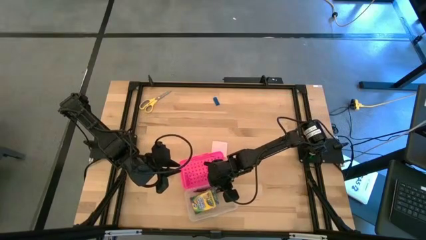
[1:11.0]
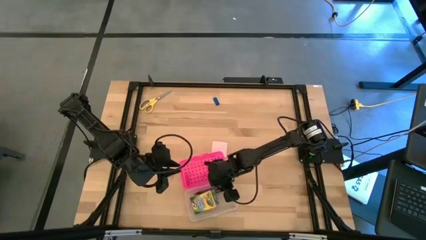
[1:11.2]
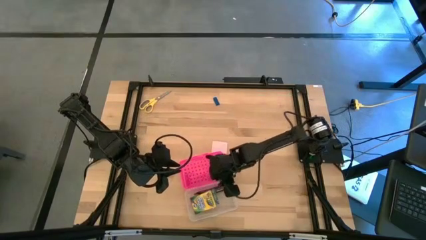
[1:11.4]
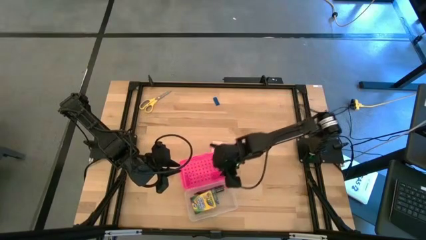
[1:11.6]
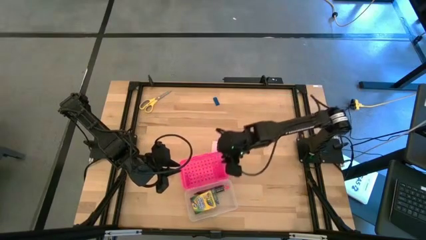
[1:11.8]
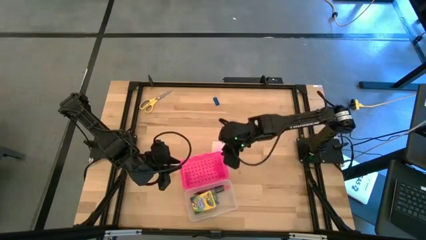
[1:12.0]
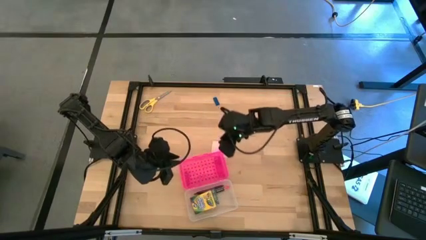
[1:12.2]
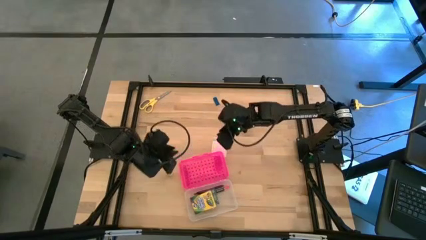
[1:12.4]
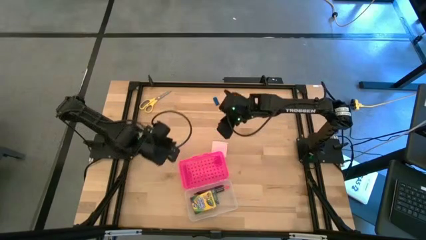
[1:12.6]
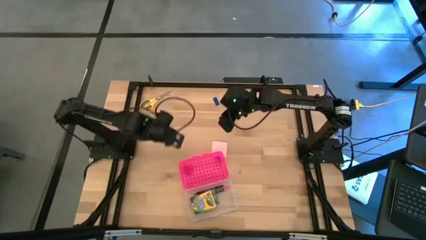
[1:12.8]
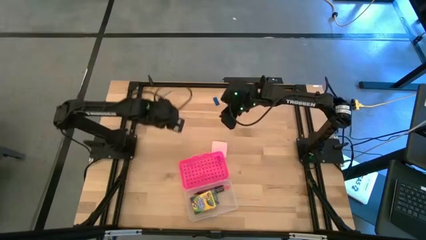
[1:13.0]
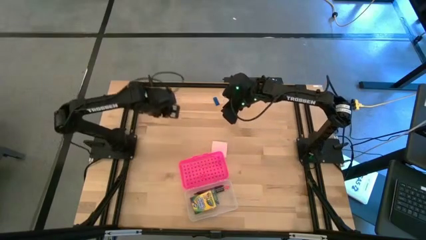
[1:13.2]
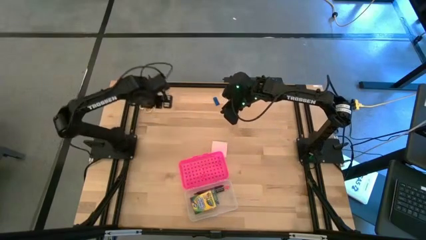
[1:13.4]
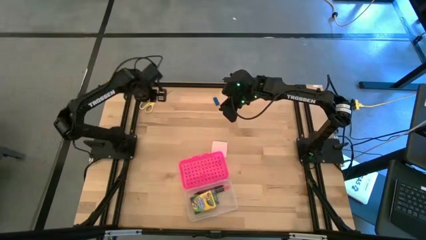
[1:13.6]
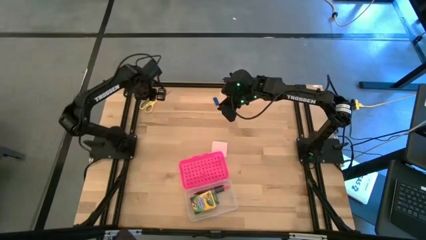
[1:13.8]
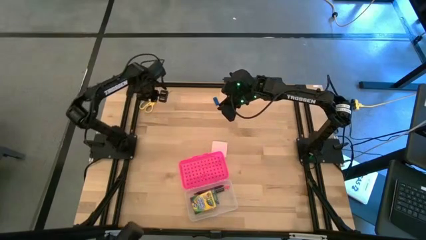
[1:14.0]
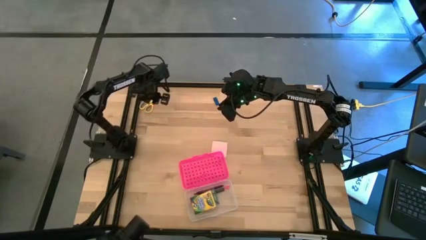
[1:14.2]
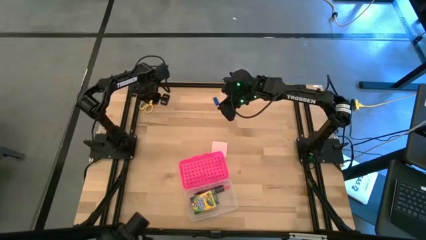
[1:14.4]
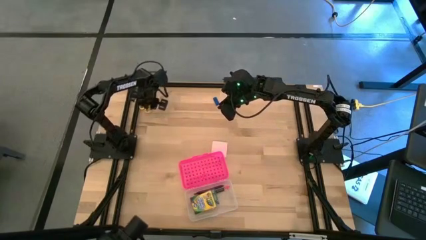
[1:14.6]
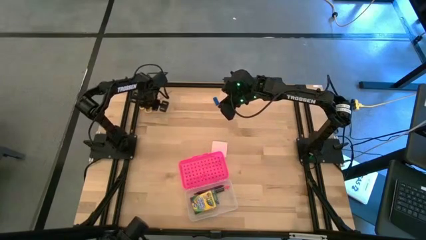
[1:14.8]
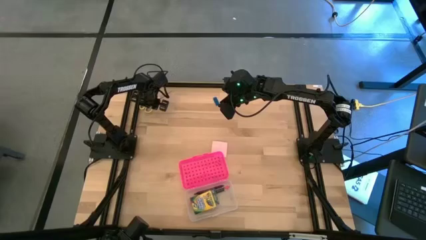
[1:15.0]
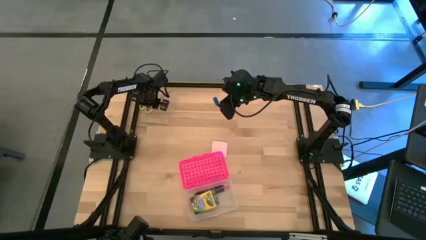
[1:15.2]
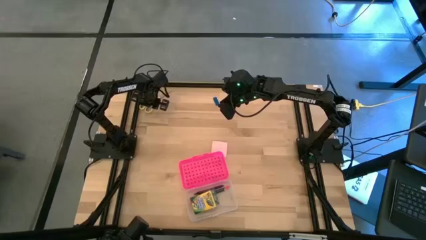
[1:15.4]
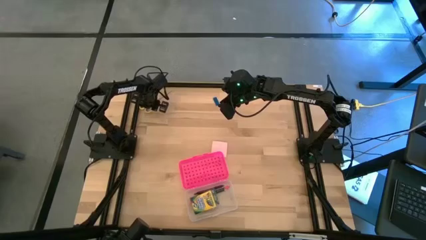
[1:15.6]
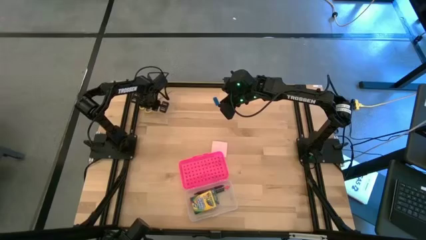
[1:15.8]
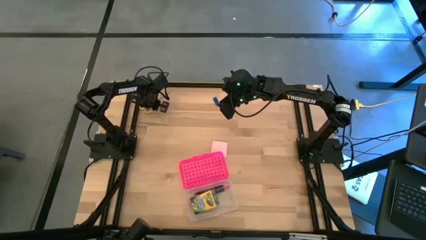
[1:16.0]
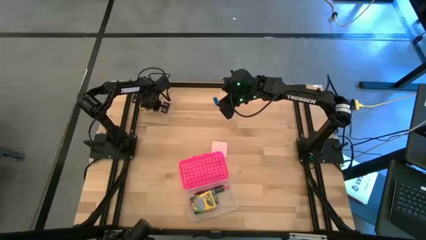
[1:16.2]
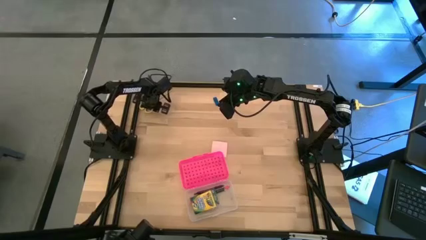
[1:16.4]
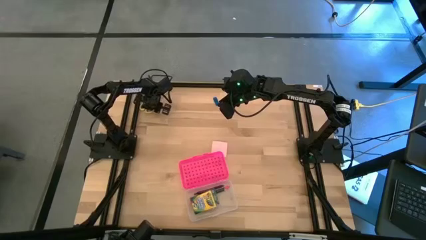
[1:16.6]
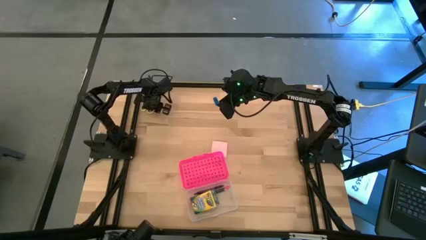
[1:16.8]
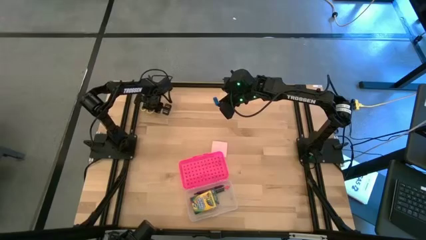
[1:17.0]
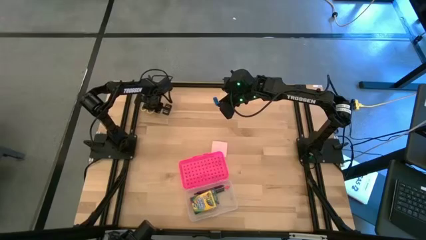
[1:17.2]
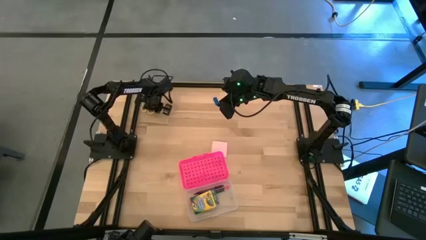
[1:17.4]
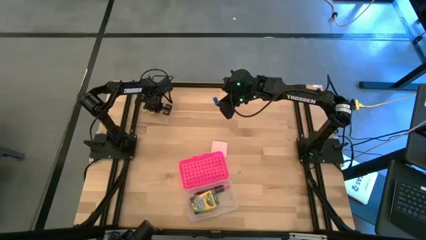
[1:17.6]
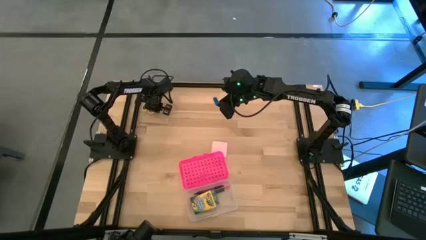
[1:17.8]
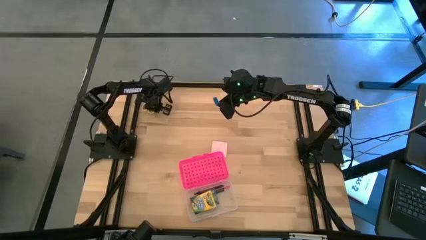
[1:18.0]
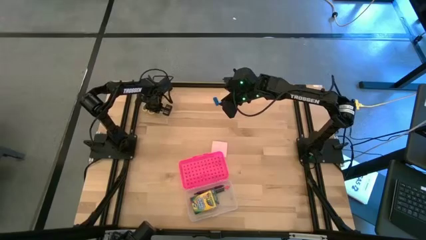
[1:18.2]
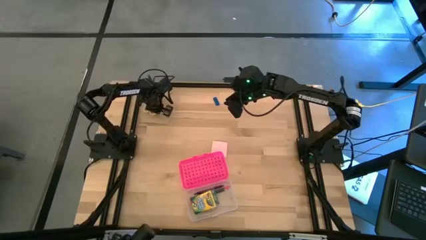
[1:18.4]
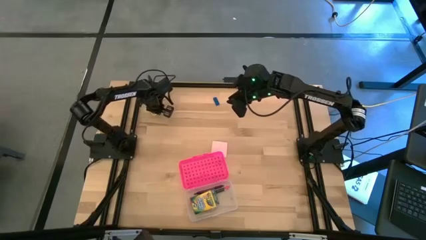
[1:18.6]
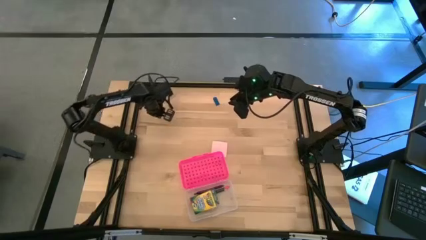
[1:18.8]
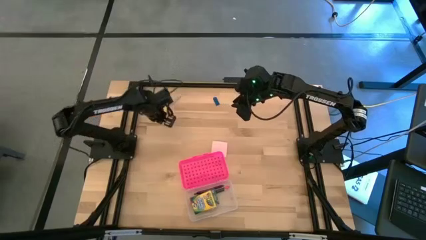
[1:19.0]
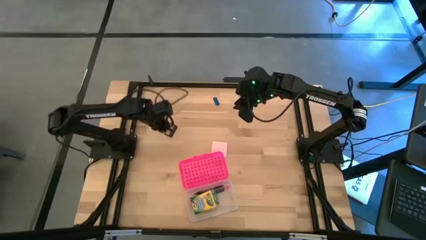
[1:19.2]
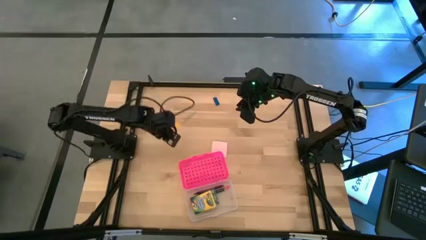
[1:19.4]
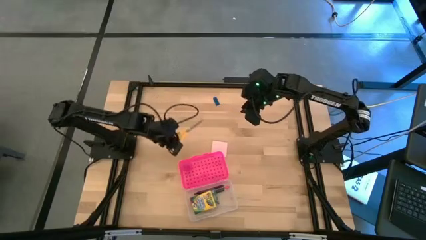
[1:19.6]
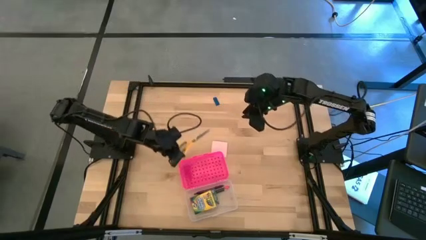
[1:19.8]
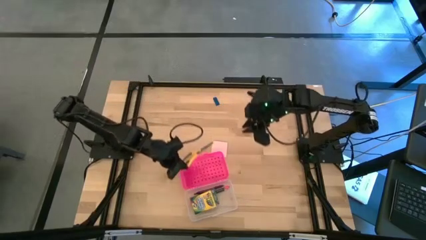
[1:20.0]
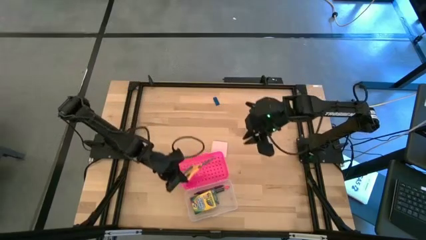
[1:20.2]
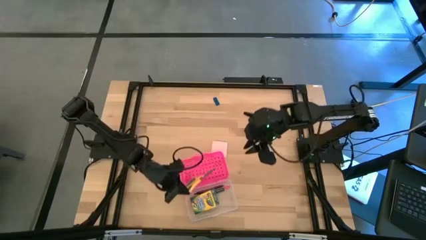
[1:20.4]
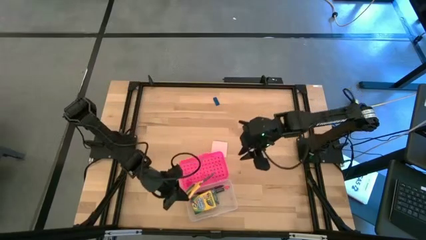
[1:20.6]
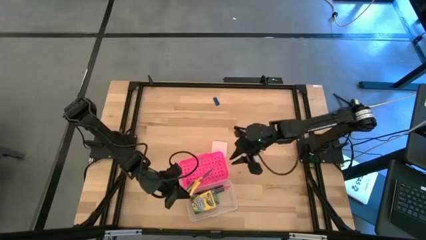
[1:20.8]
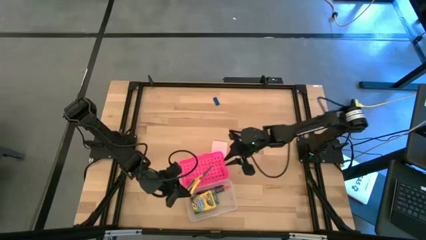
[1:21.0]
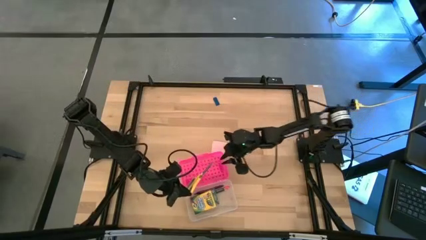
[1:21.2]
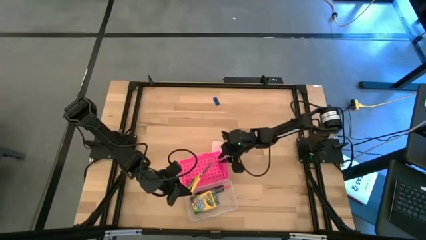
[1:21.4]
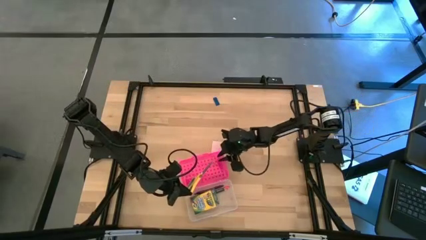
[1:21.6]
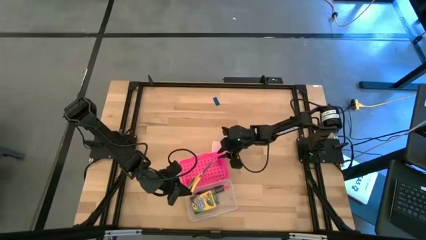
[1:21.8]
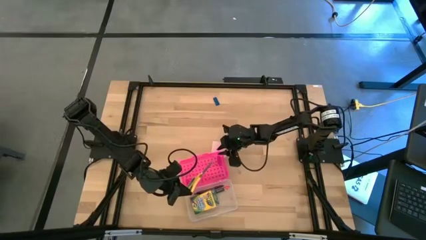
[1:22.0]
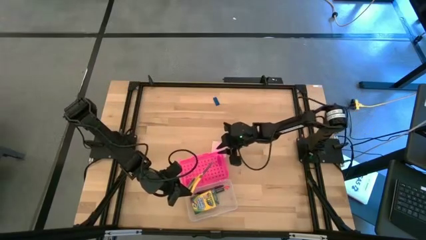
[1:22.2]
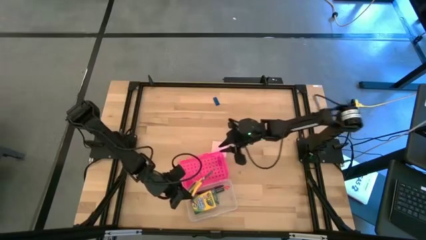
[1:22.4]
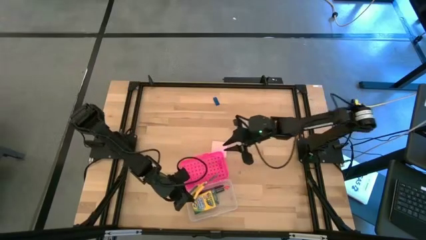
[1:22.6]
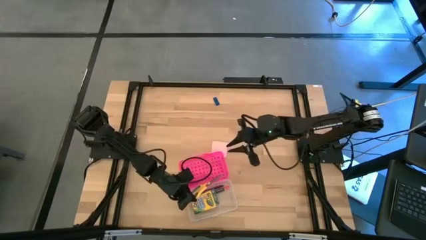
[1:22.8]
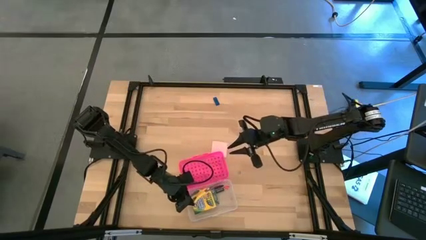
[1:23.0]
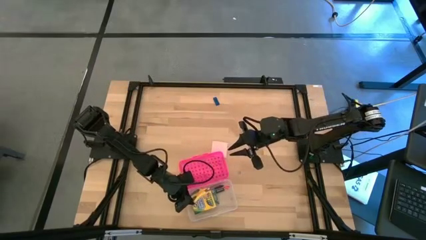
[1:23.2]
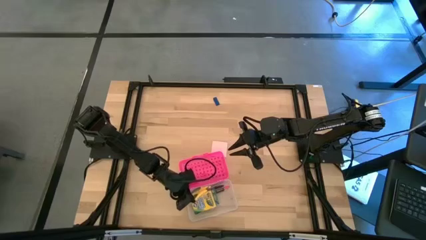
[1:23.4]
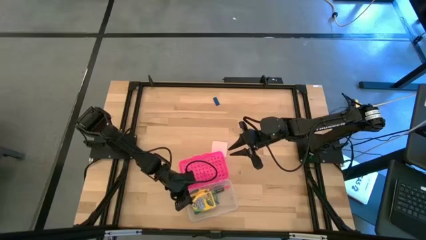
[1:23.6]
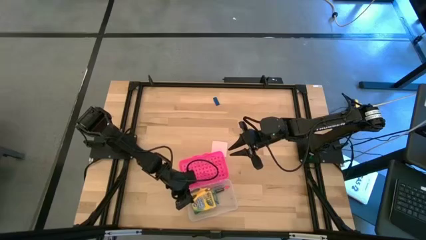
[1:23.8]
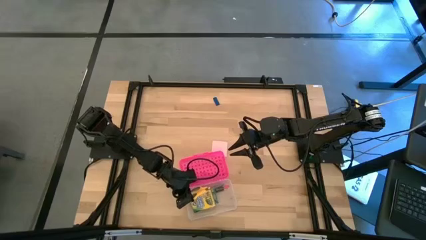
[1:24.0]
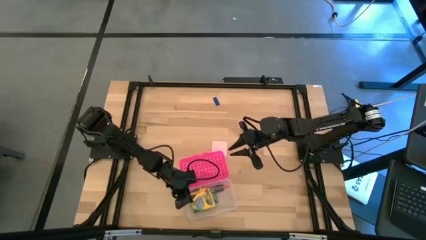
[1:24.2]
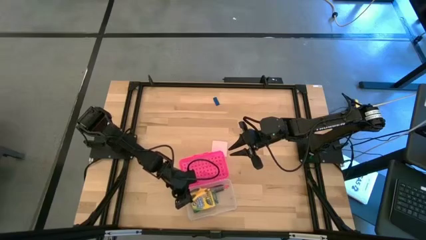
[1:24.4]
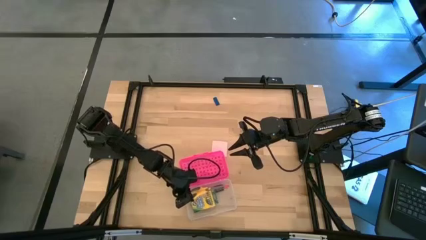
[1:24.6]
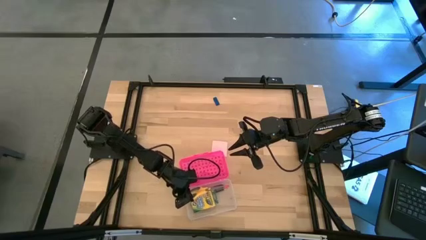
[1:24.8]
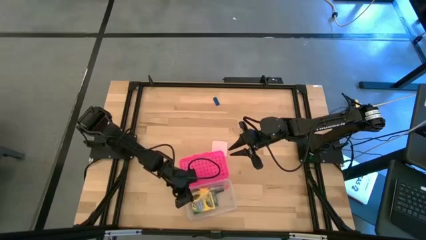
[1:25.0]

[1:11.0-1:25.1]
Task: Pack school essentials
Put the yellow scissors into the pink supply box
